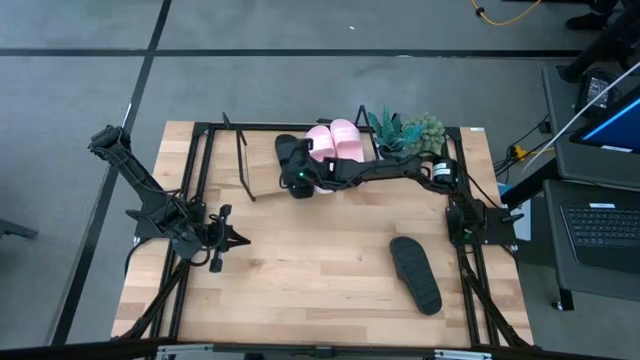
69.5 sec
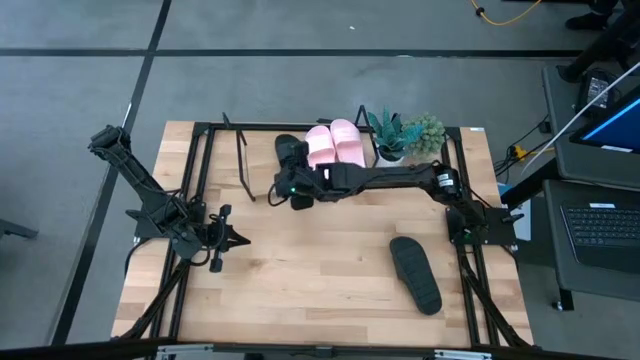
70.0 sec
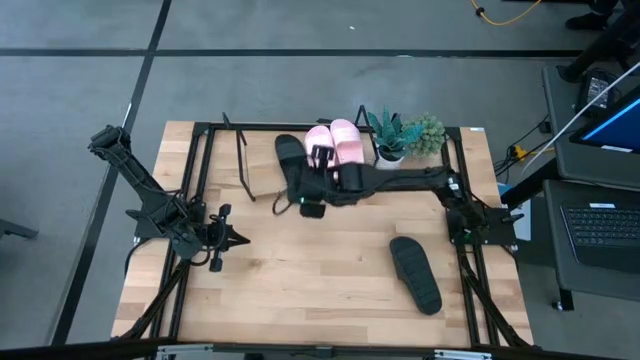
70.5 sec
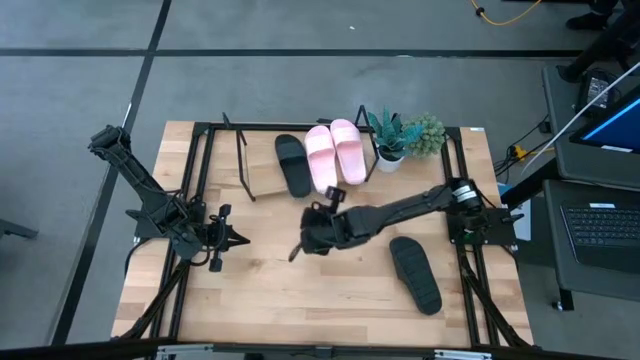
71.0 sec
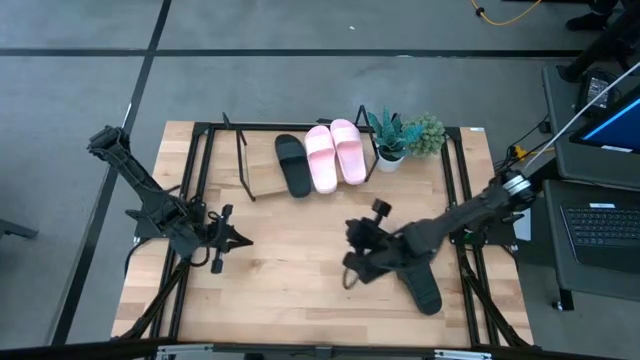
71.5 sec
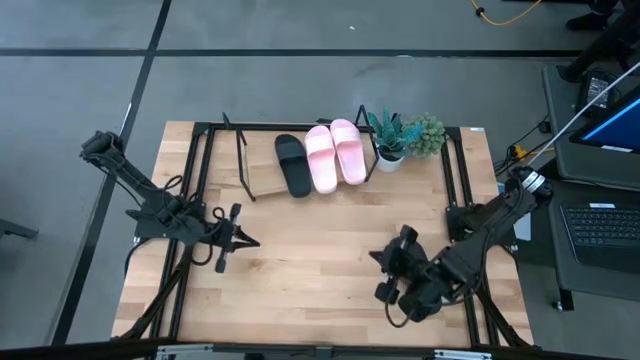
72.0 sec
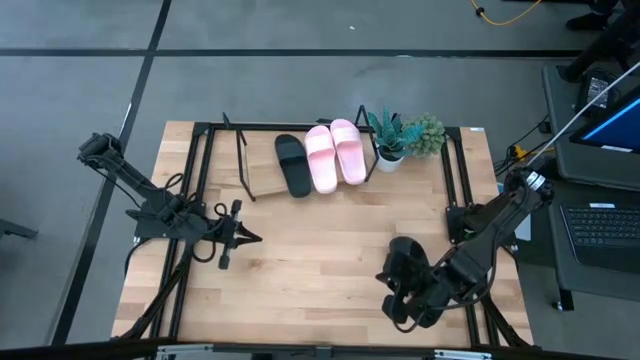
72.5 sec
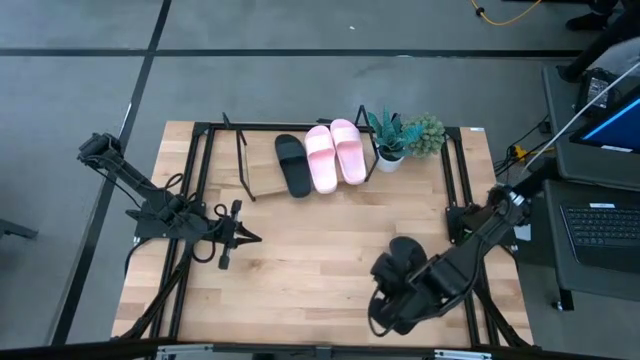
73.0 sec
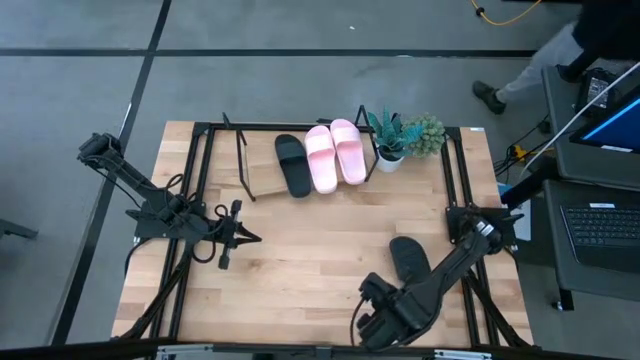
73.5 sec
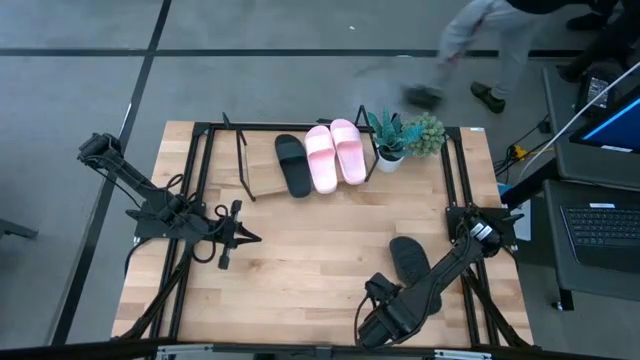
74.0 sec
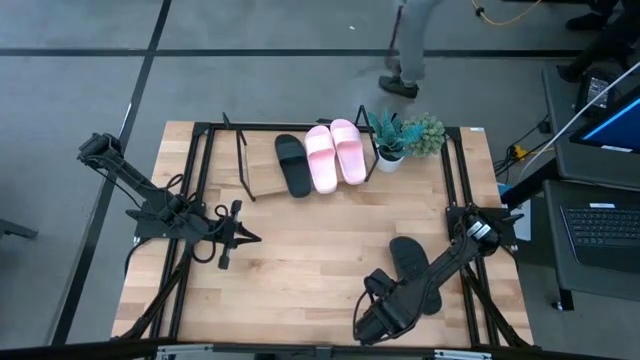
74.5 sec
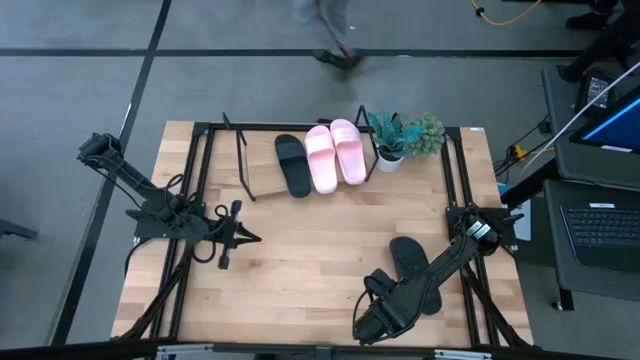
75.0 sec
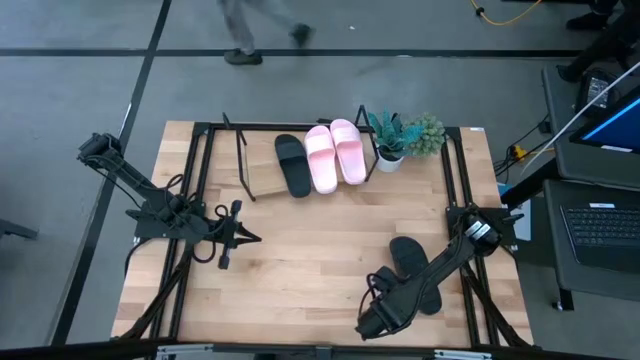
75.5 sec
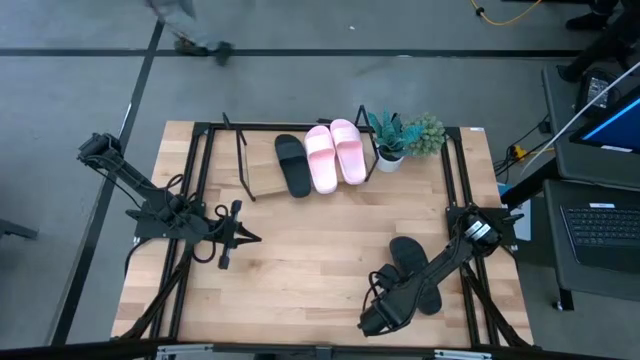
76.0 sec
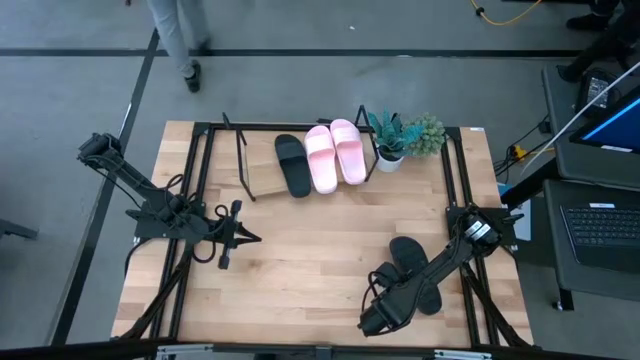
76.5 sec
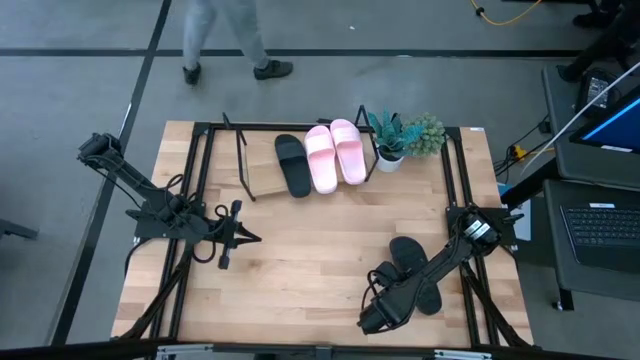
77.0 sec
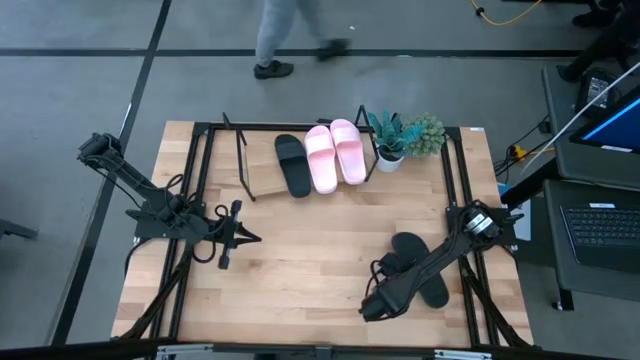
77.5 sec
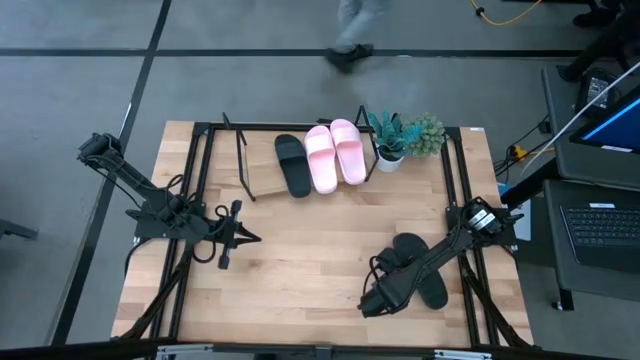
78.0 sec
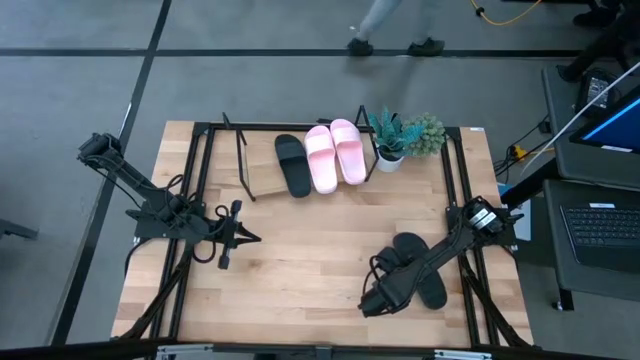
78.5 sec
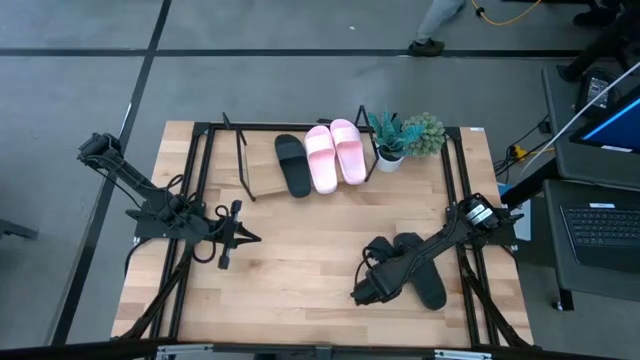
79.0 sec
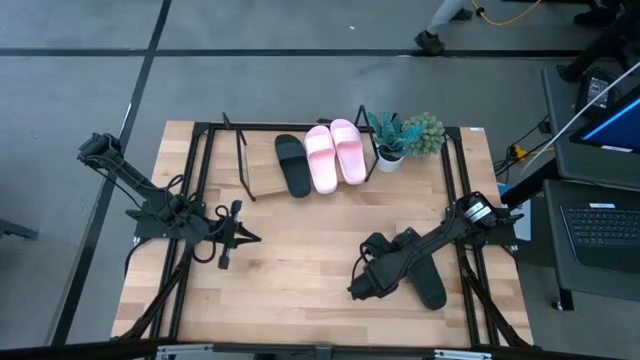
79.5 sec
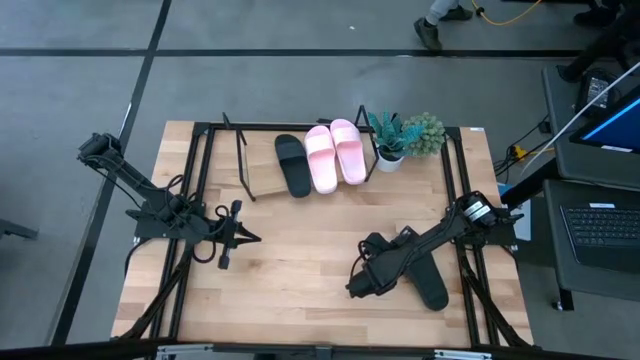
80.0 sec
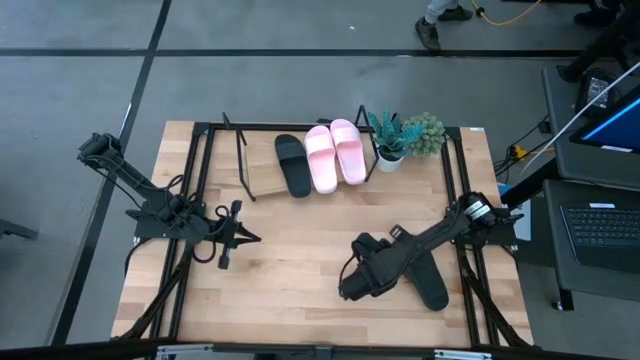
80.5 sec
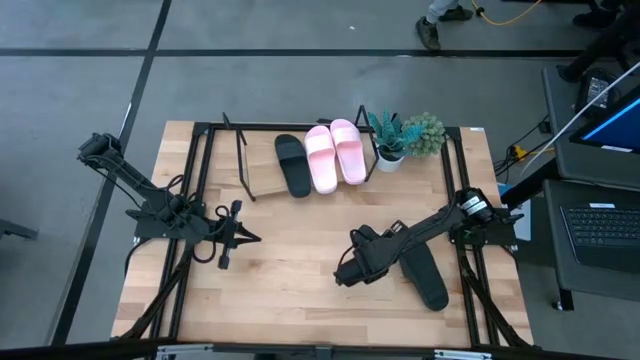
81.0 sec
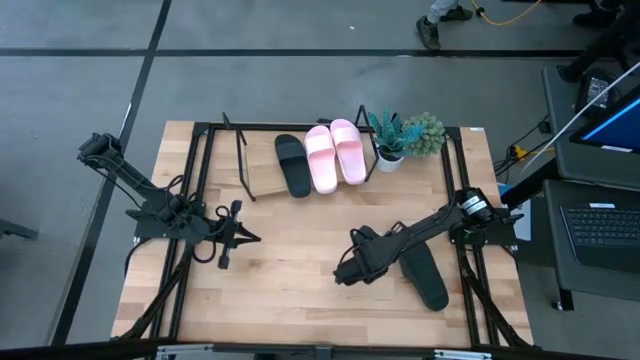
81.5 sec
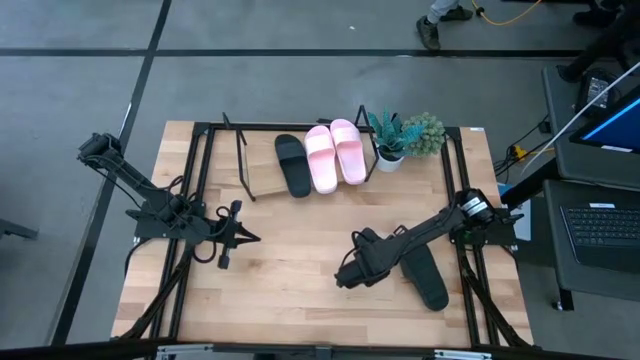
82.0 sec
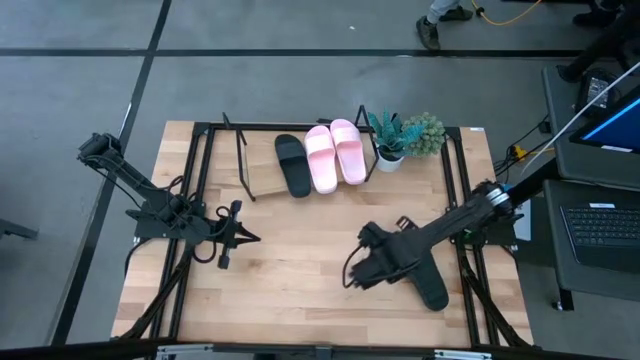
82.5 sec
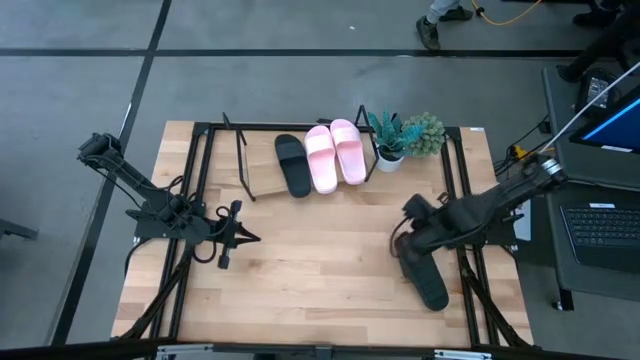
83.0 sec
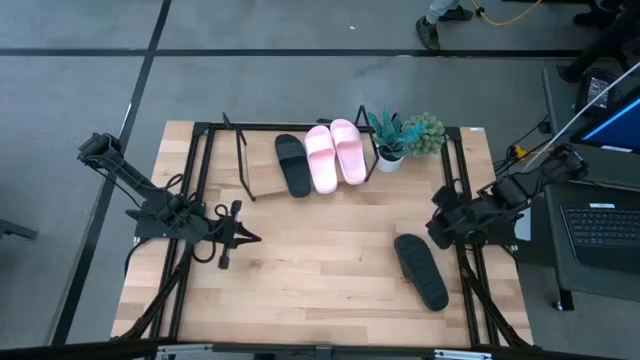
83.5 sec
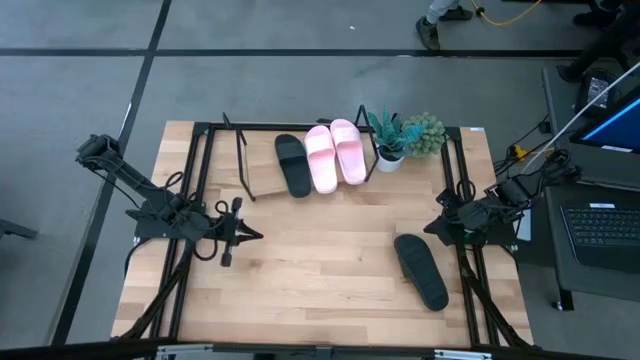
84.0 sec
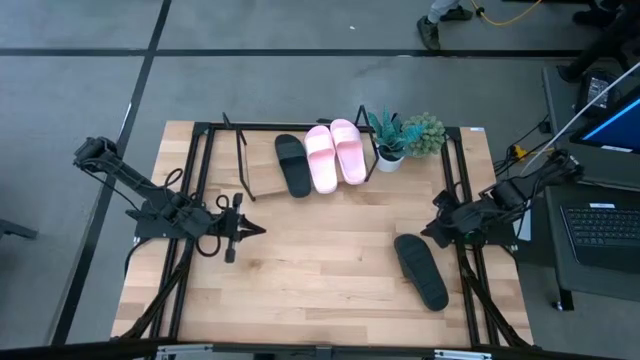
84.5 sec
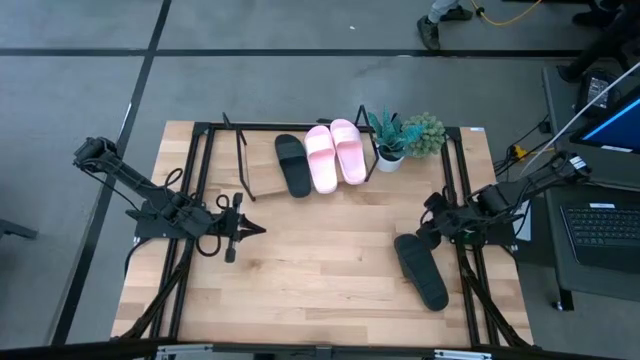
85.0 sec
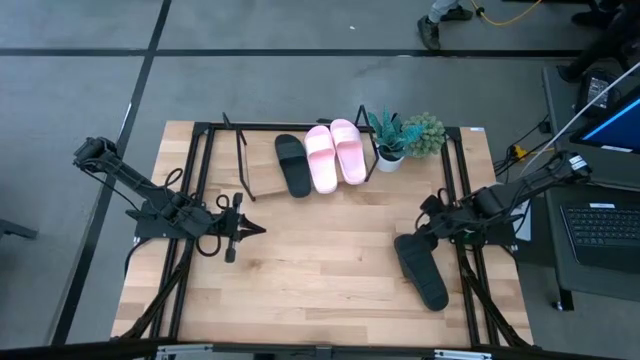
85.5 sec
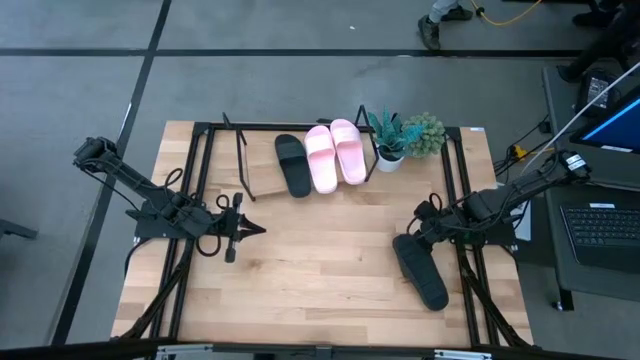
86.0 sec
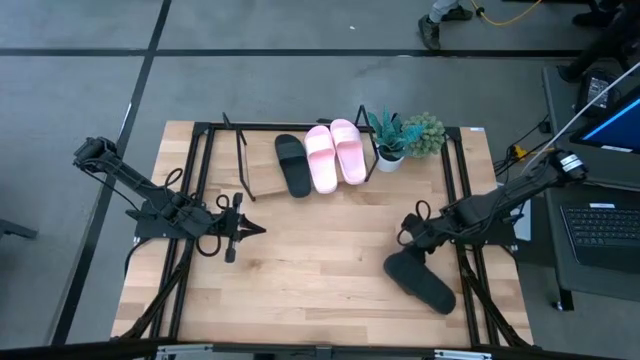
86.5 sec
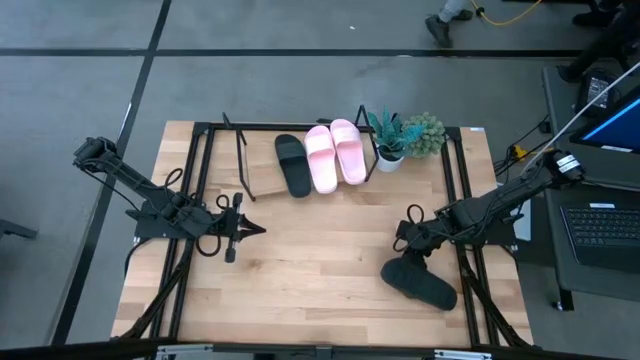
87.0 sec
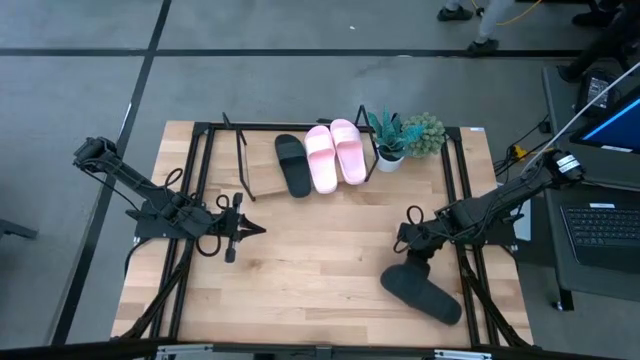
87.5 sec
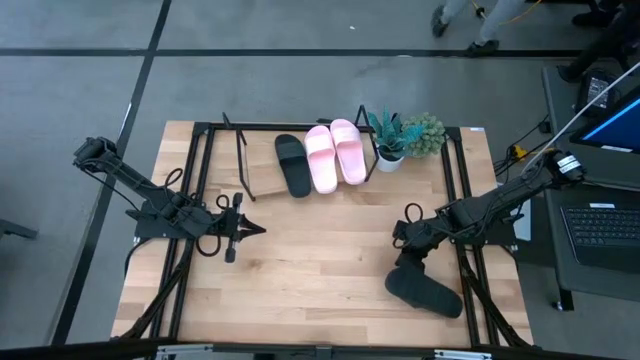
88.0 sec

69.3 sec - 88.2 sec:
Task: Pick and place slides into the shelf
Put the black slide on the shelf

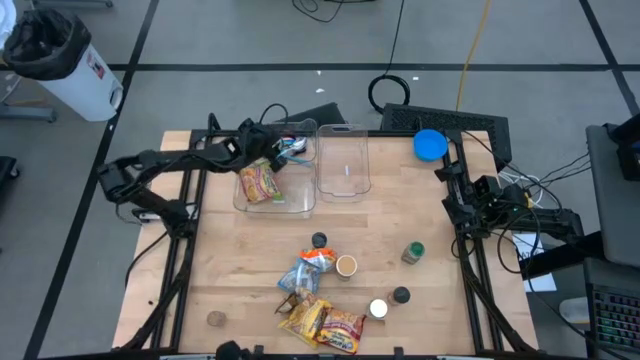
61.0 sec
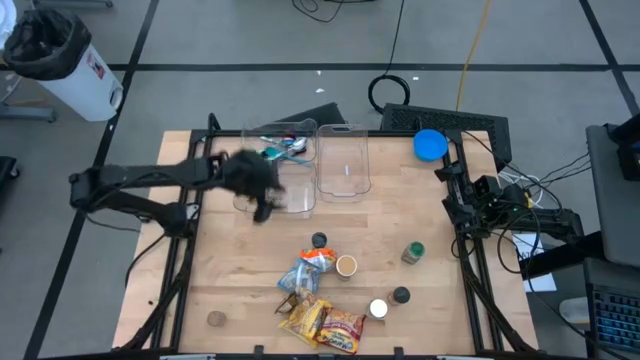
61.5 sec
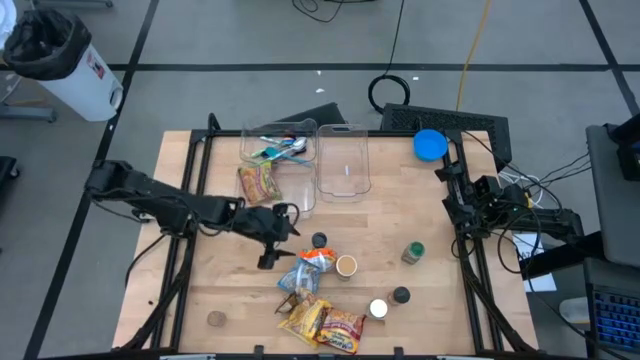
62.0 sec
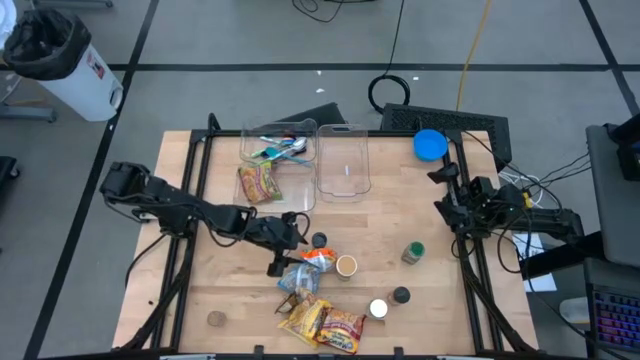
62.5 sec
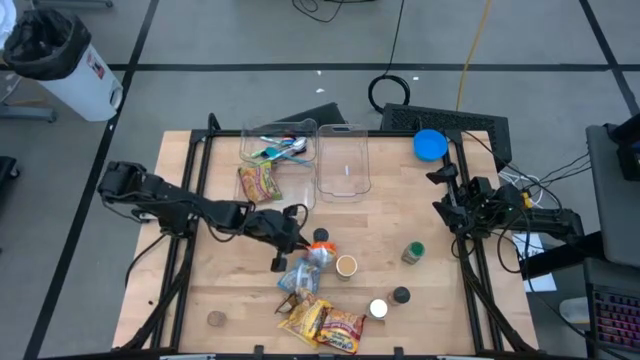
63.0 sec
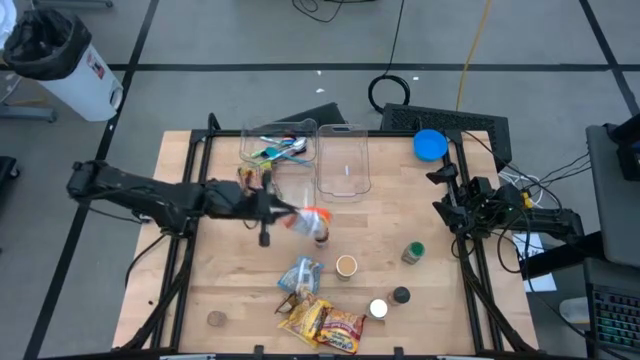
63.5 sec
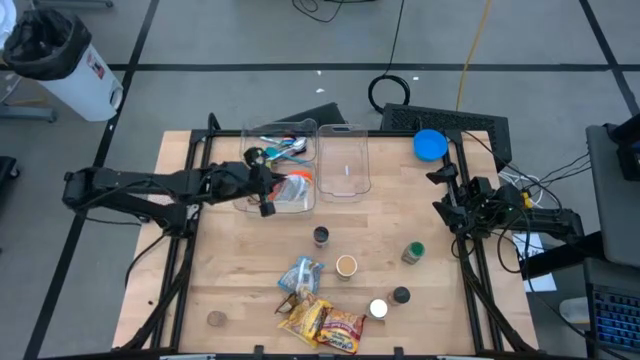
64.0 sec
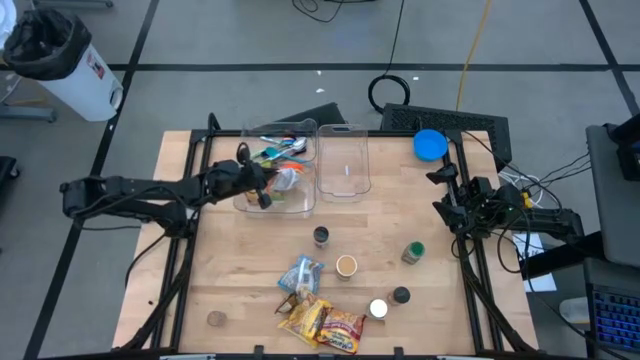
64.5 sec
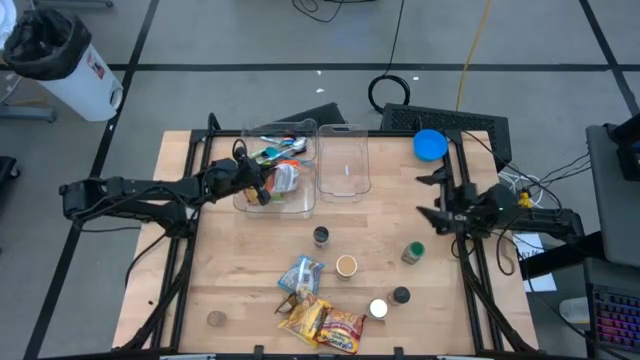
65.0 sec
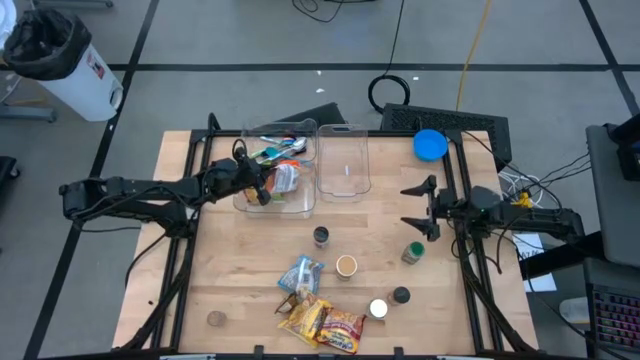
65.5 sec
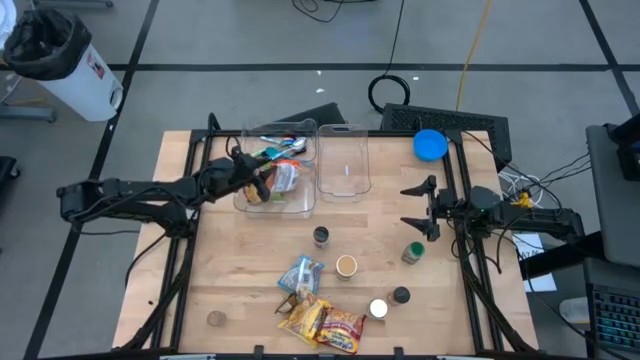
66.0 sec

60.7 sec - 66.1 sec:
Task: Pick & Place Food Item
Put the orange noodle pack into the bottom left transparent bin
